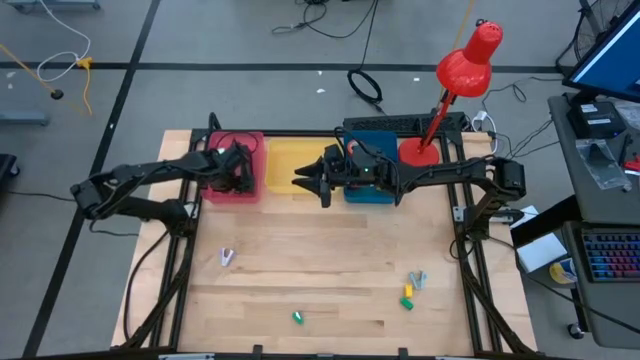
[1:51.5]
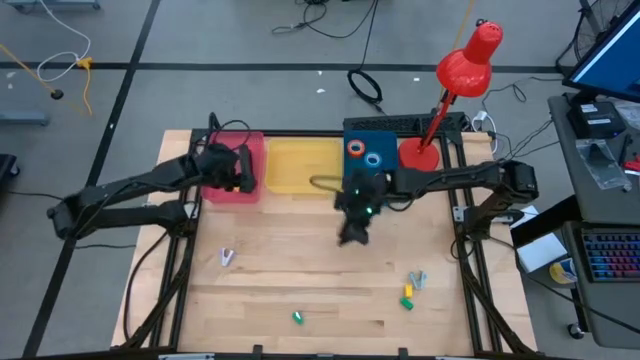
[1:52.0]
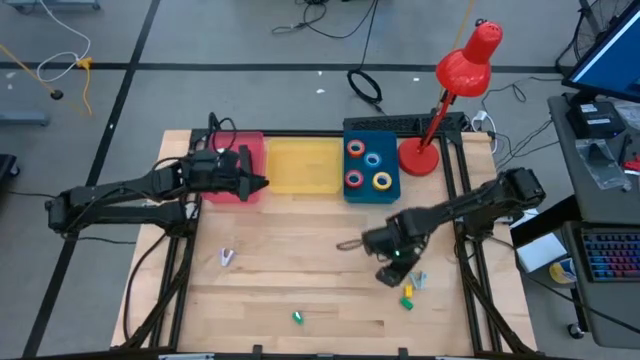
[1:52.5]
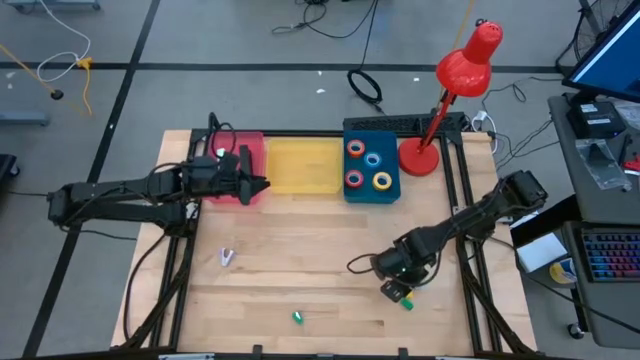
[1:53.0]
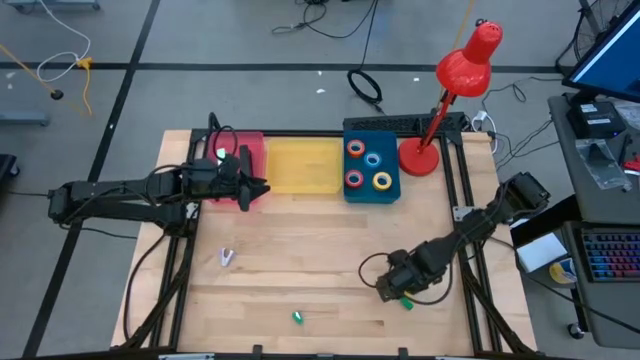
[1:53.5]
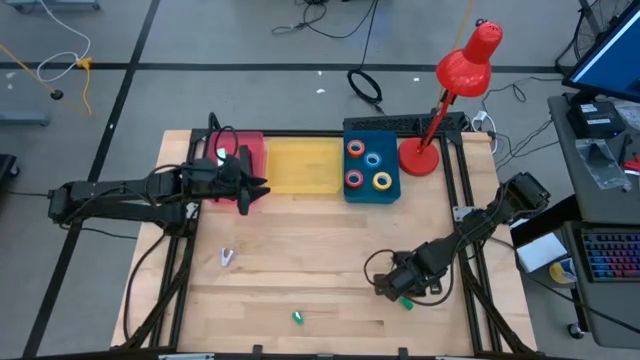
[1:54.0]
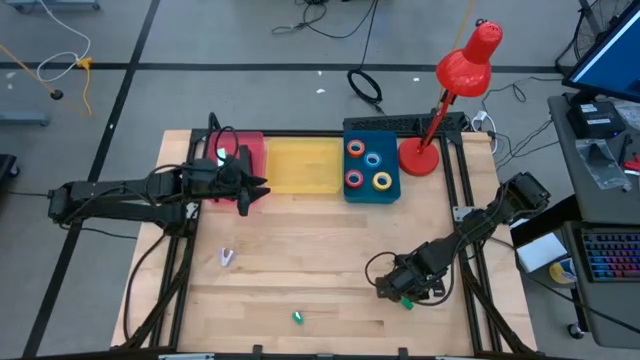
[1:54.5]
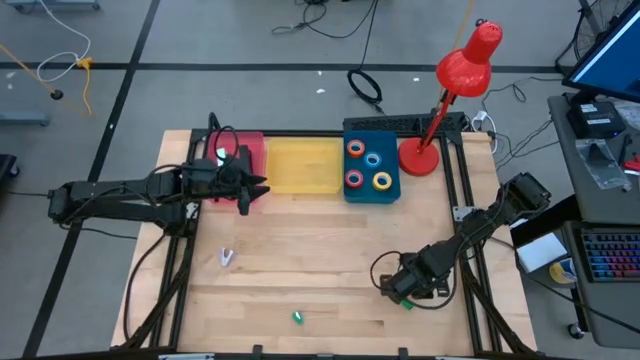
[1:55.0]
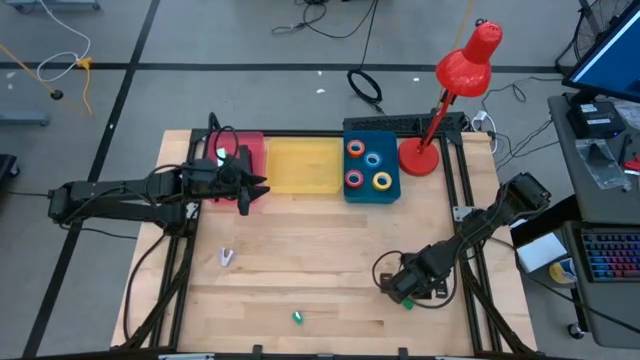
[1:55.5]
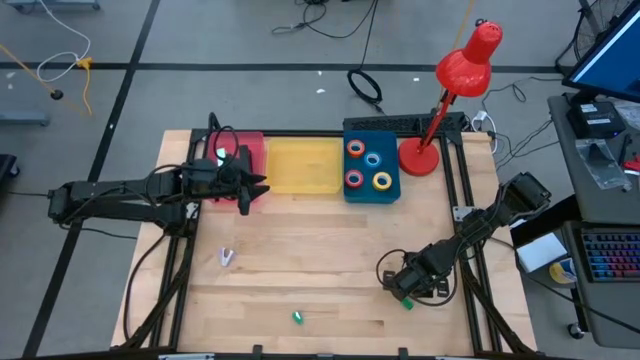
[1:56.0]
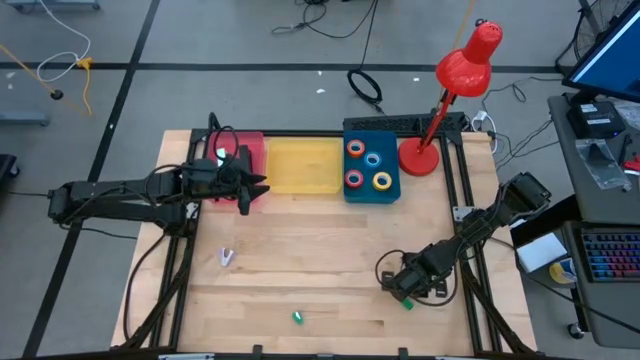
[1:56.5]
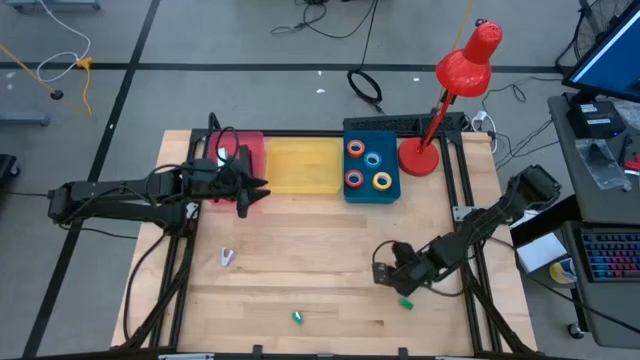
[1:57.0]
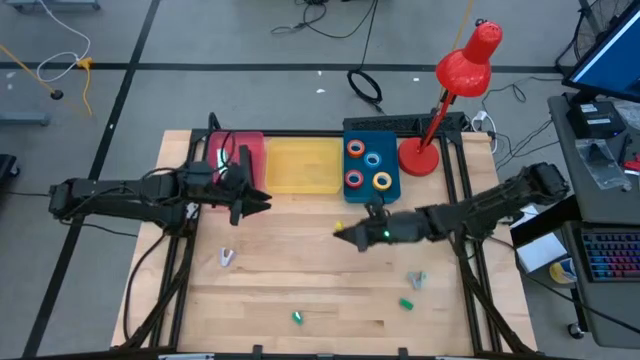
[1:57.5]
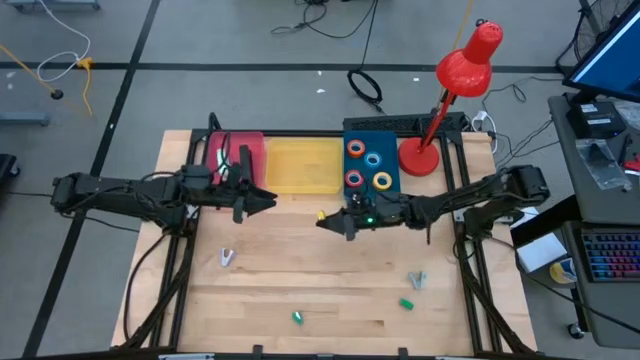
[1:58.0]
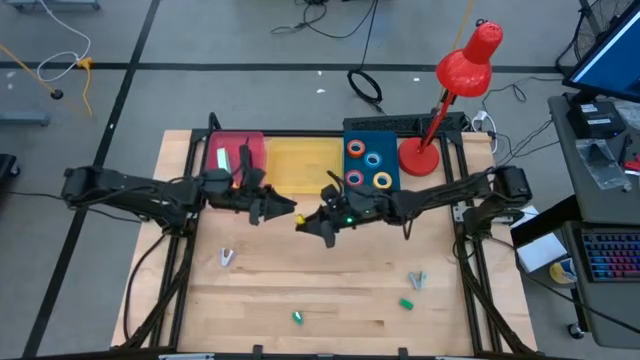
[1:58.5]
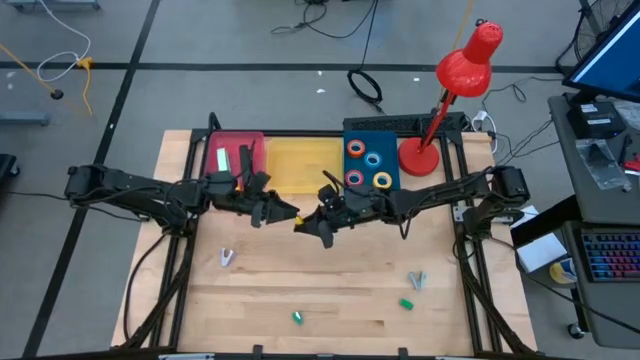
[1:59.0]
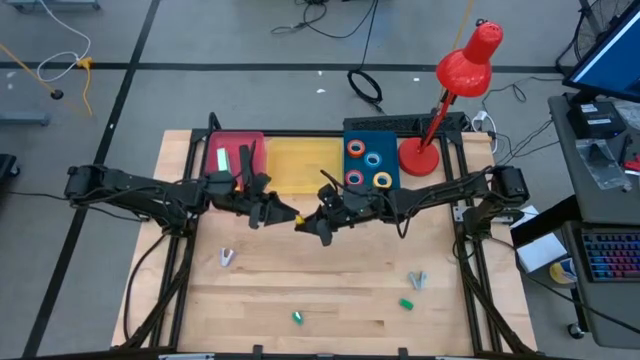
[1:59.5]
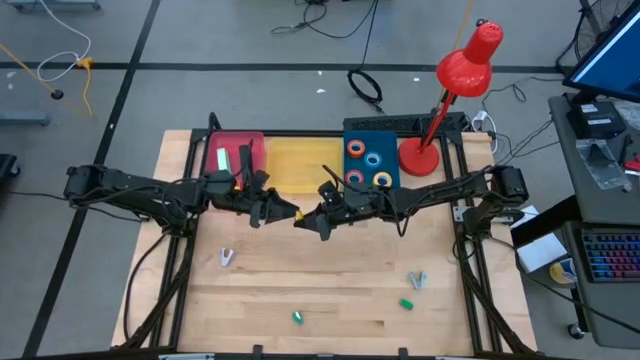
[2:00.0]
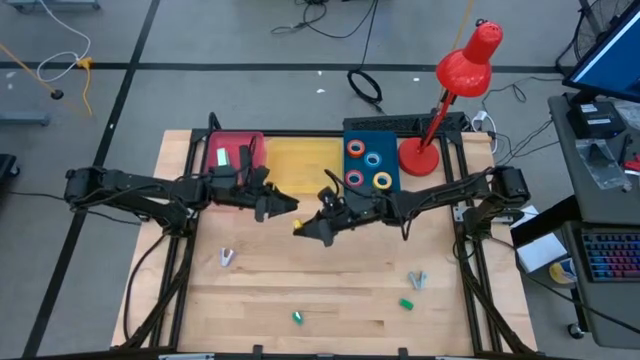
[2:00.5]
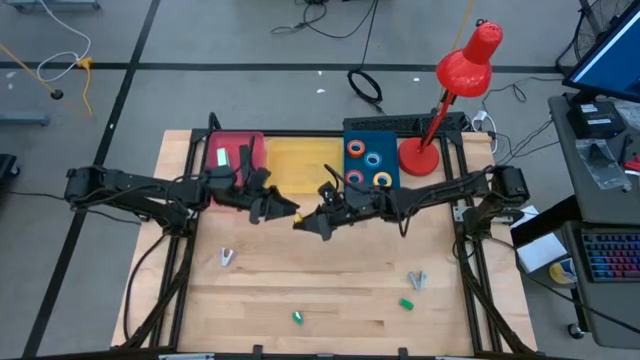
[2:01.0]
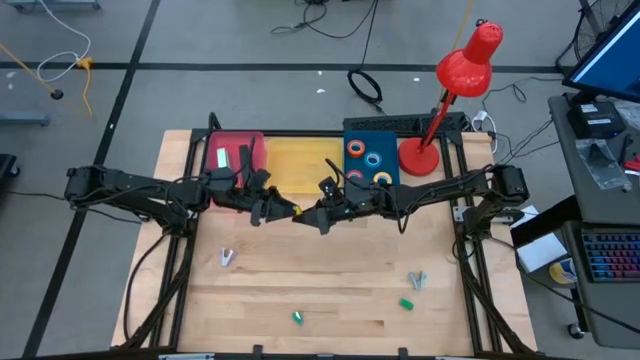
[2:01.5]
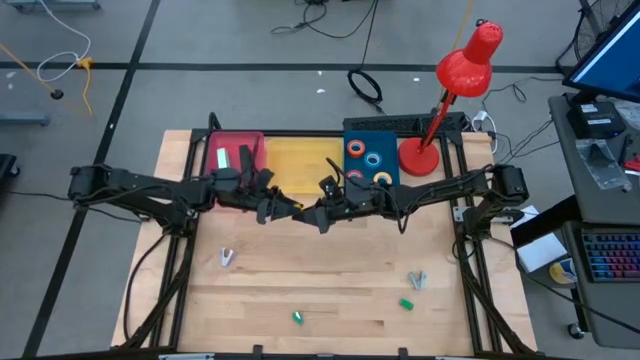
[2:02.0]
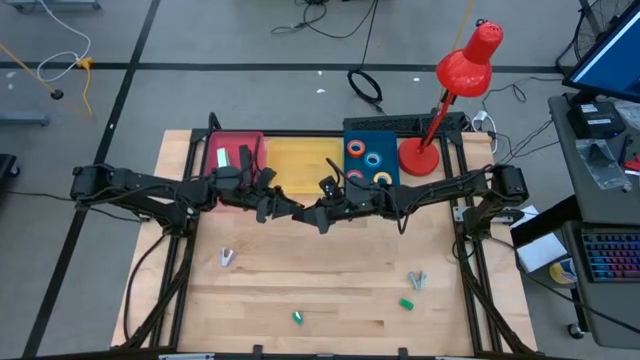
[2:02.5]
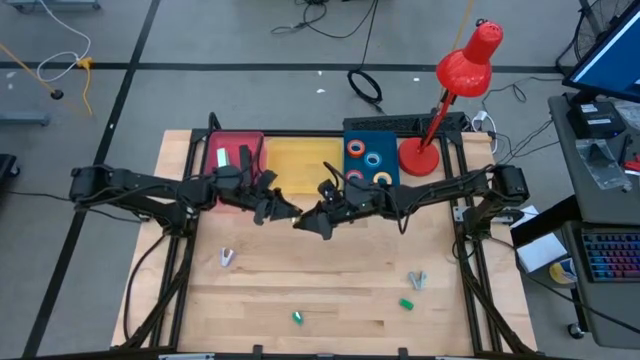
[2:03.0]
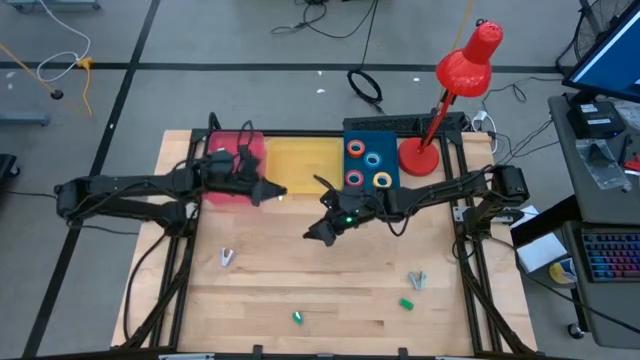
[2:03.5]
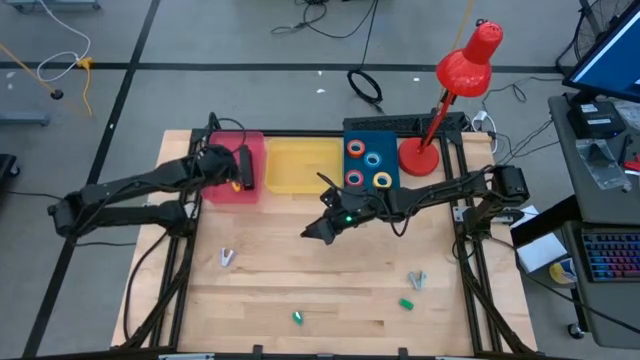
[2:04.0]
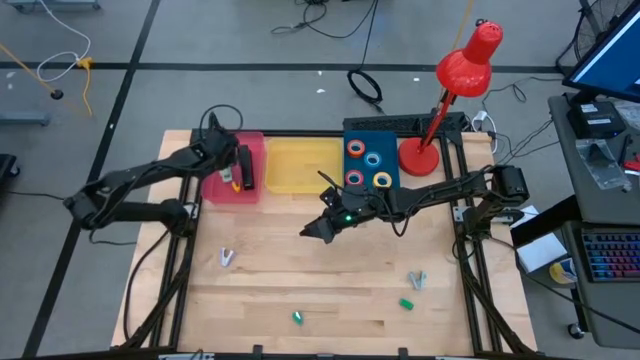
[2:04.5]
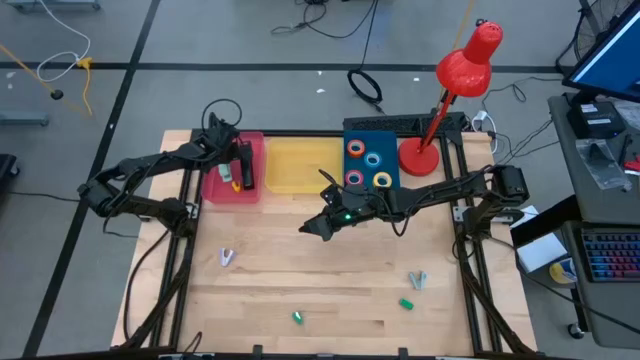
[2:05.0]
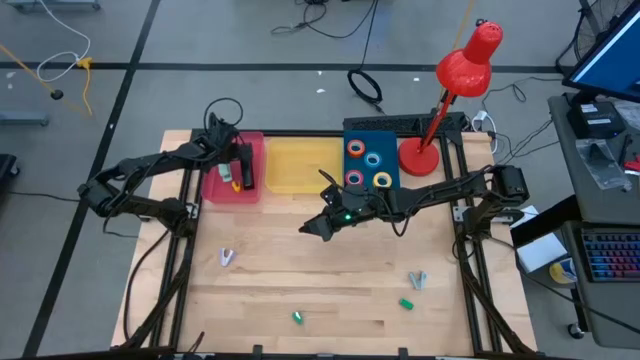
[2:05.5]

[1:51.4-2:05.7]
Task: Pick and place Stapler, Stapler remover, tape
Put the yellow stapler into the red bin

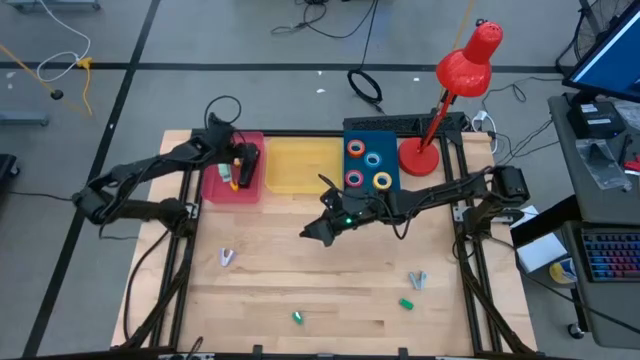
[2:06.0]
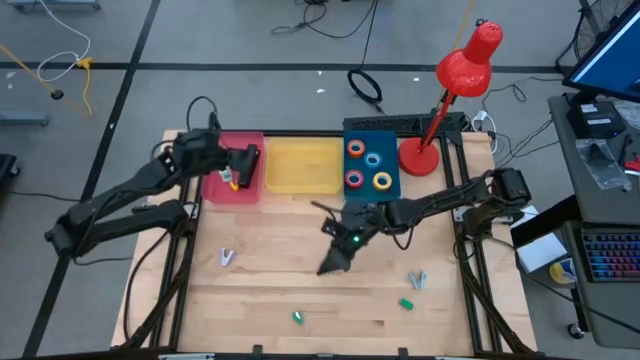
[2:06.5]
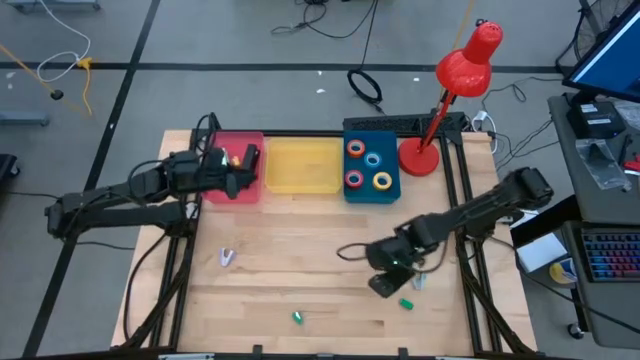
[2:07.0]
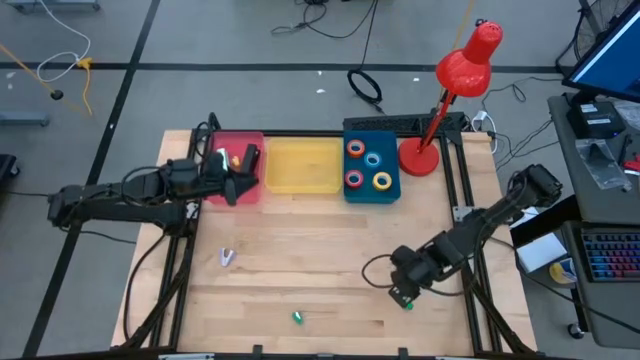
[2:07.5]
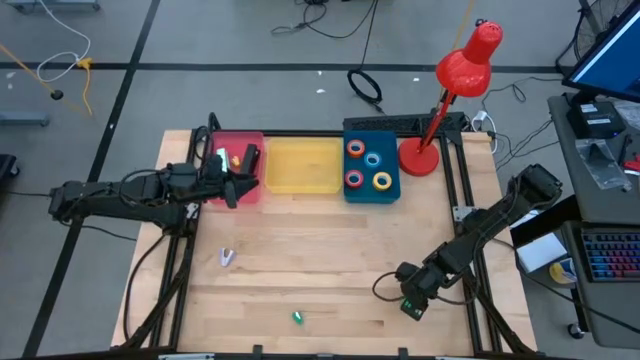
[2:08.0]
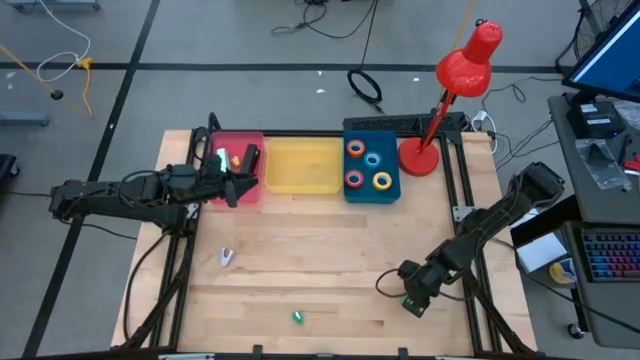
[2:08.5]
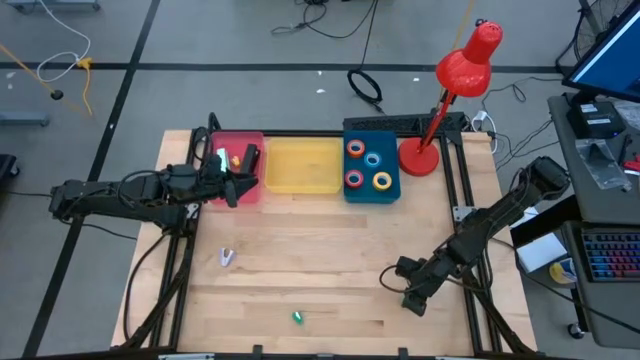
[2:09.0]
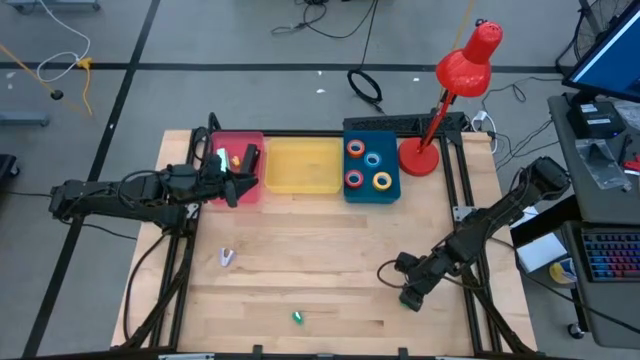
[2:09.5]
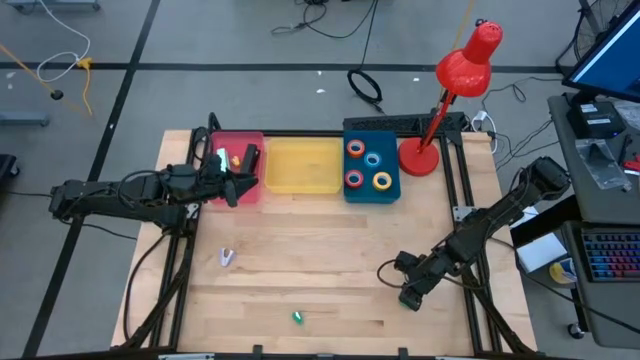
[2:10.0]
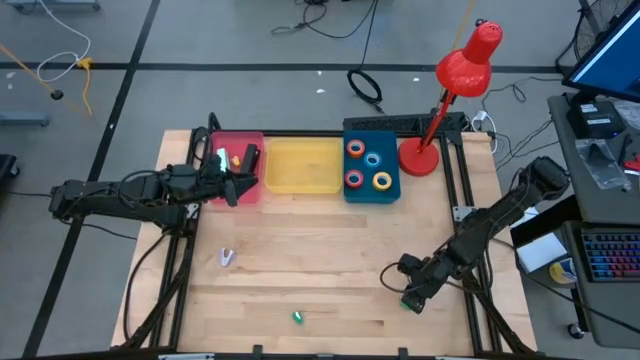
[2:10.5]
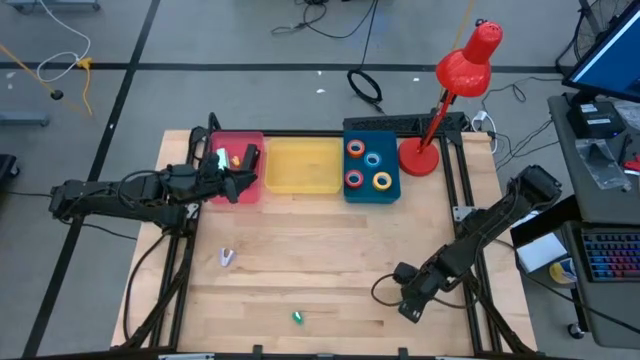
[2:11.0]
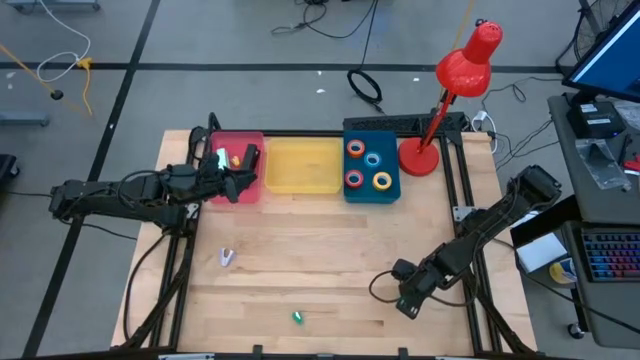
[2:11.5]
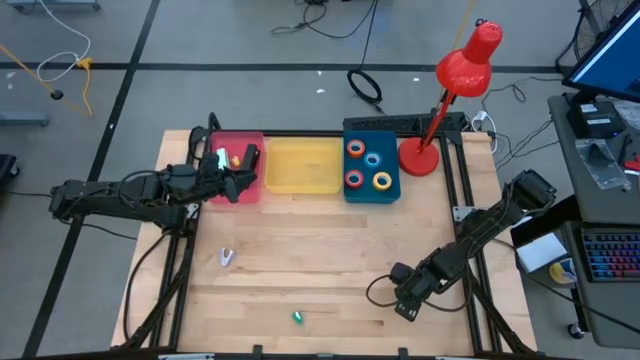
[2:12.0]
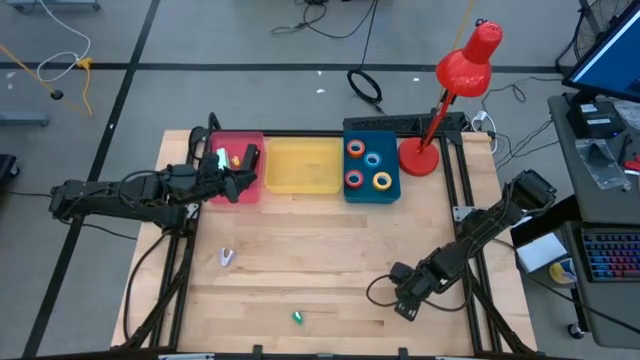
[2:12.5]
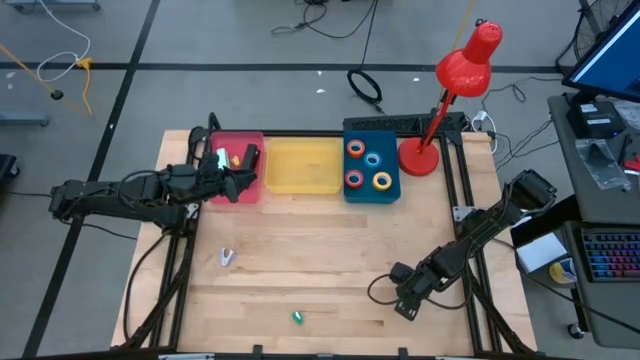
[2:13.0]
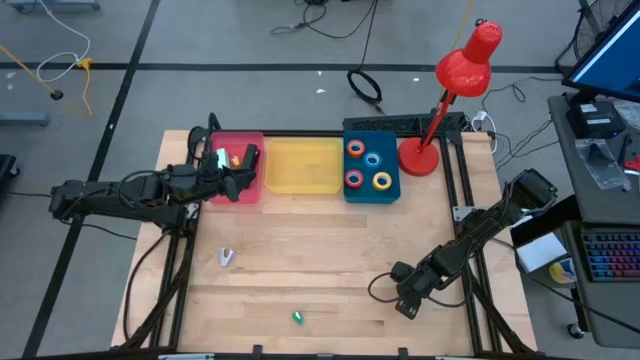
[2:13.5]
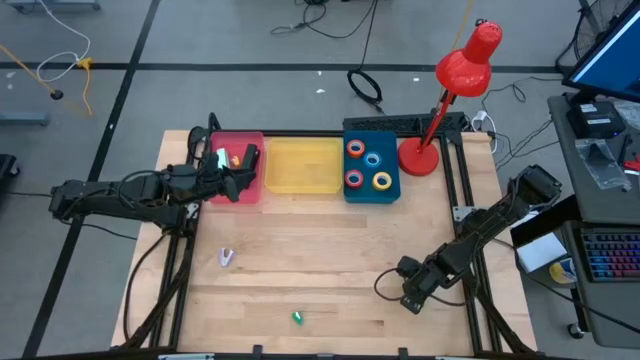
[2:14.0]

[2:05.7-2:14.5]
Put the right green stapler into the red bin
